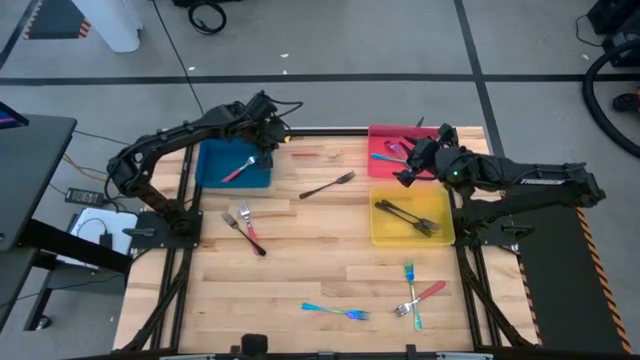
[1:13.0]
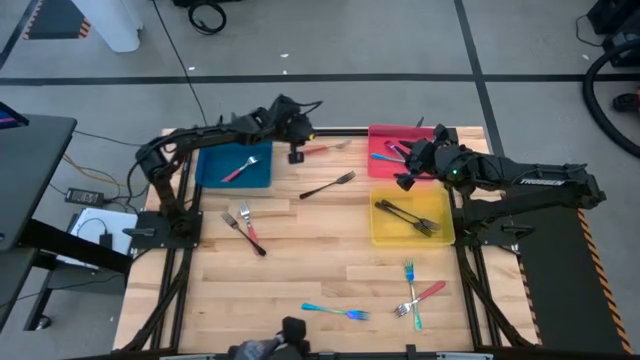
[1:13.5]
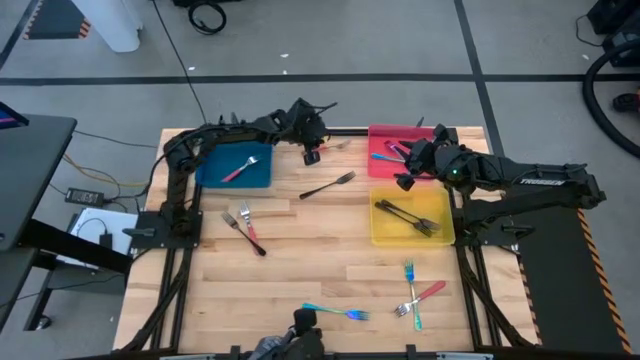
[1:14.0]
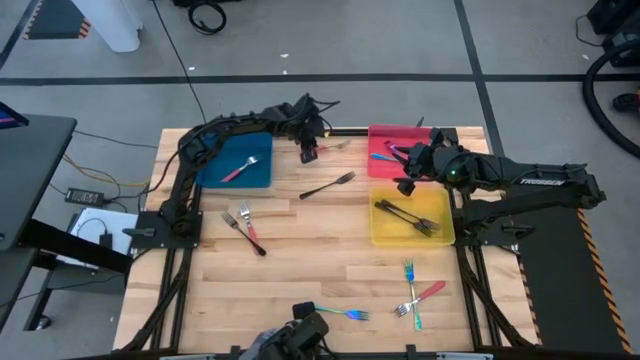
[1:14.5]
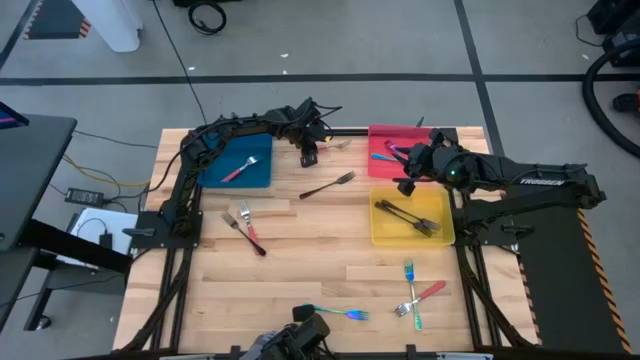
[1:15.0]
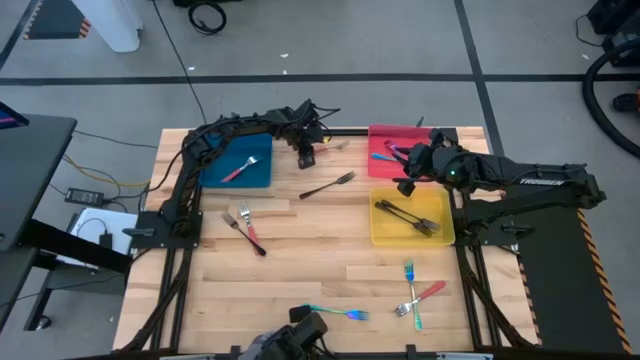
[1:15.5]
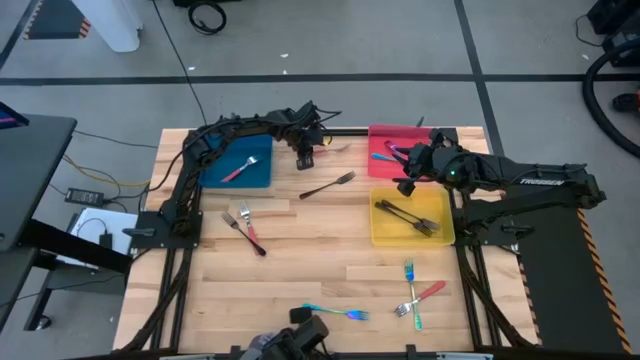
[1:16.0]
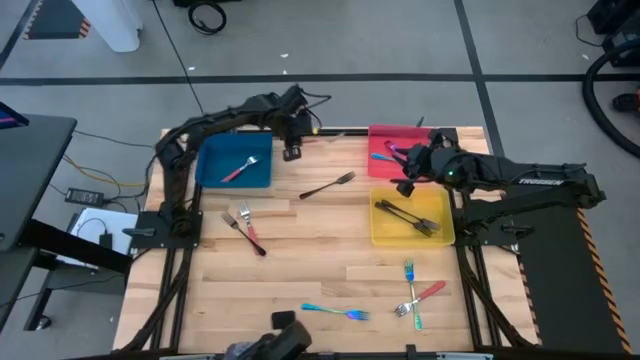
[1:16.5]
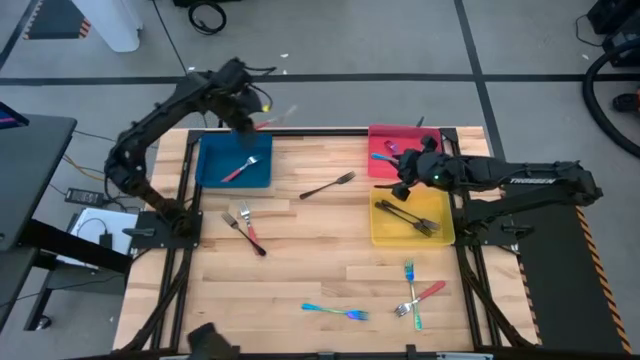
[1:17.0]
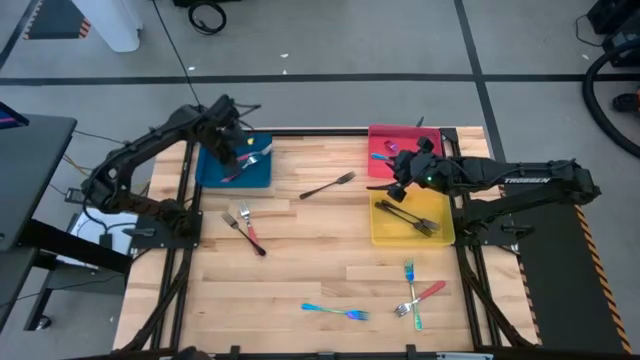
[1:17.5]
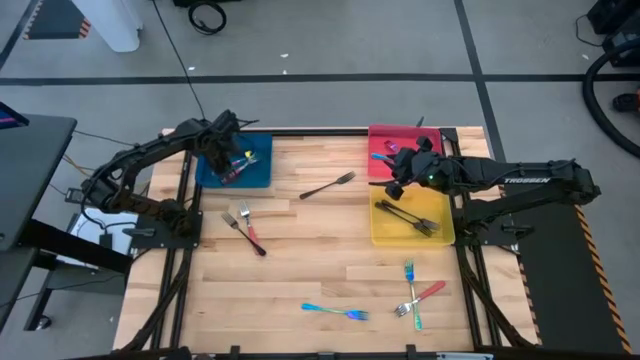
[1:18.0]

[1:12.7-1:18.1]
Task: Sort silverware by color (type)
Put the red fork into the blue bin

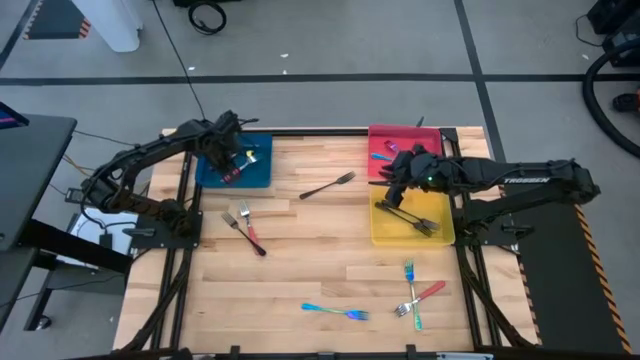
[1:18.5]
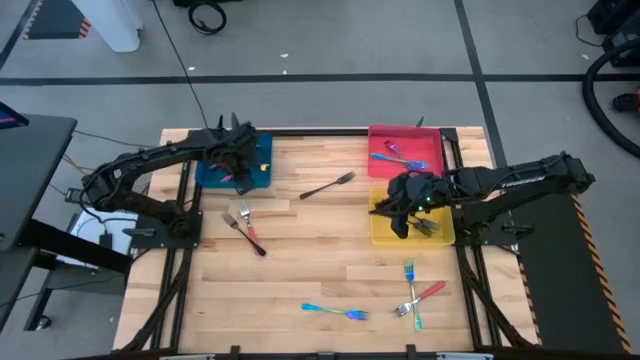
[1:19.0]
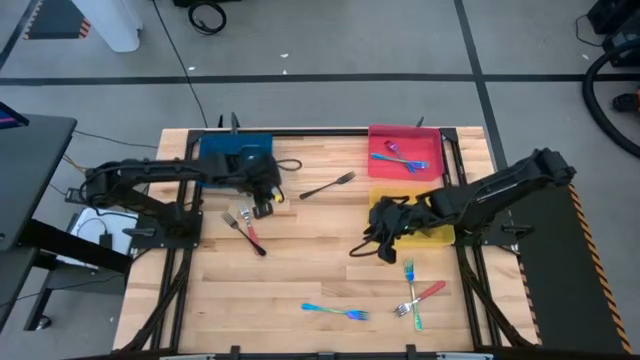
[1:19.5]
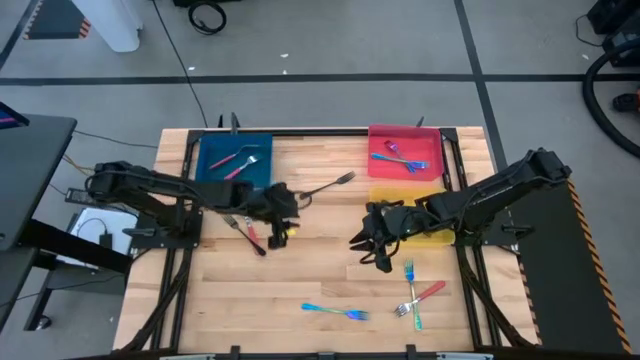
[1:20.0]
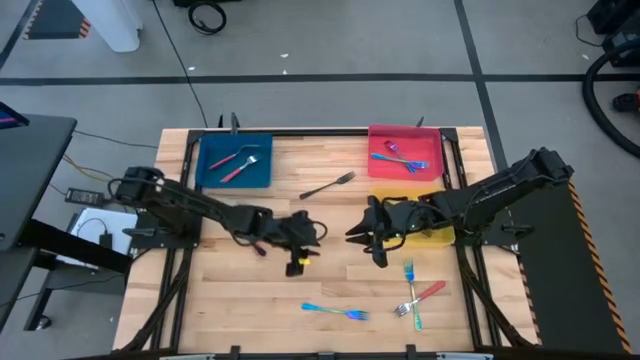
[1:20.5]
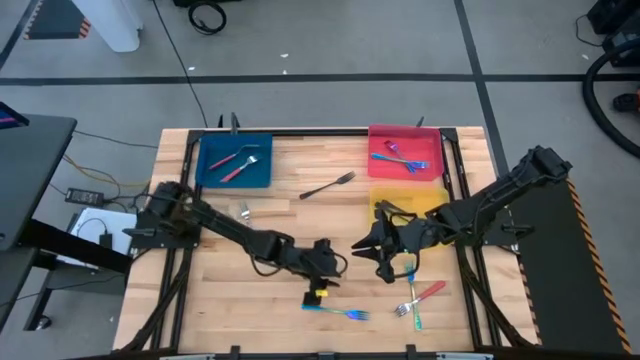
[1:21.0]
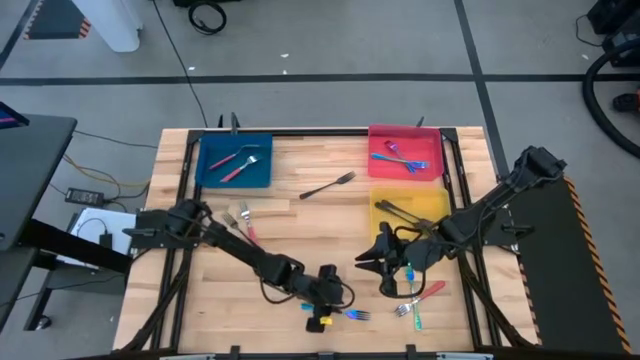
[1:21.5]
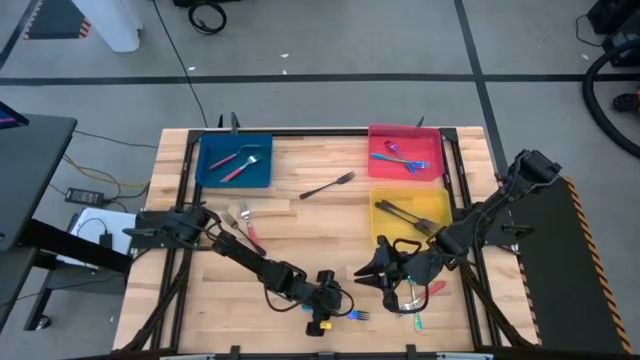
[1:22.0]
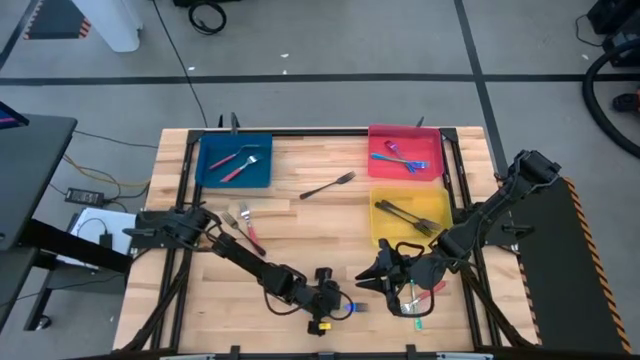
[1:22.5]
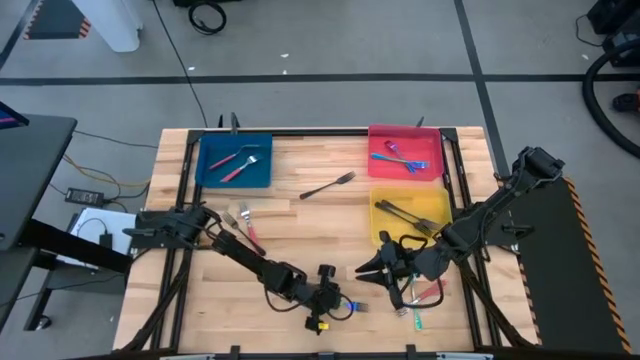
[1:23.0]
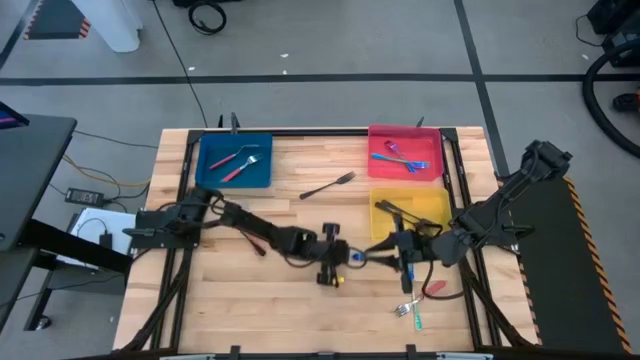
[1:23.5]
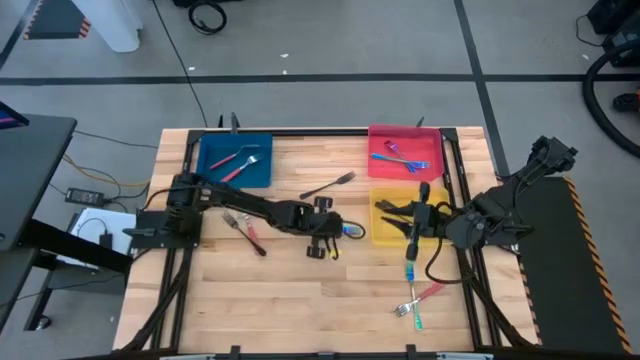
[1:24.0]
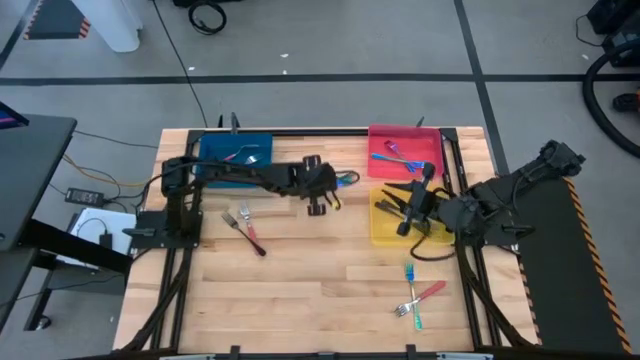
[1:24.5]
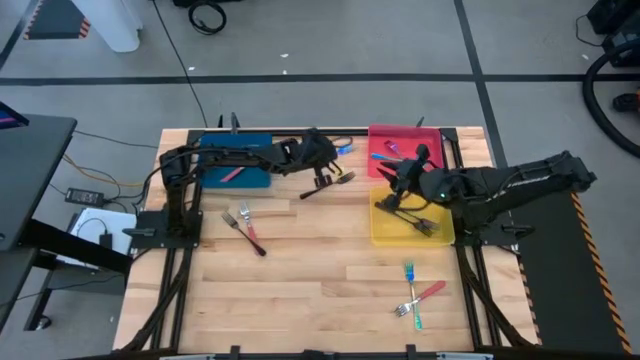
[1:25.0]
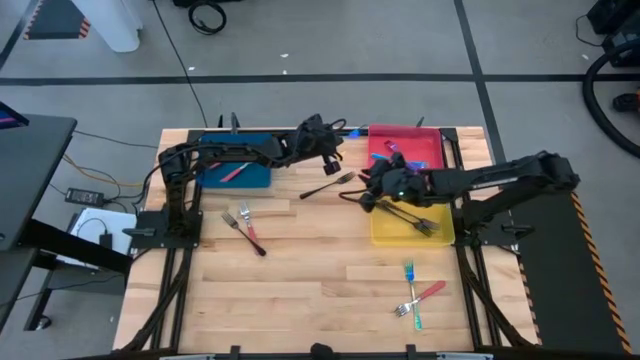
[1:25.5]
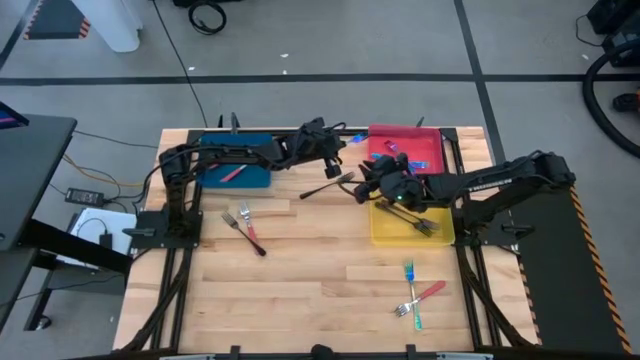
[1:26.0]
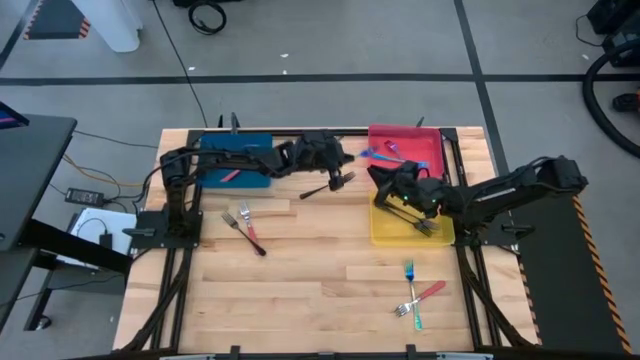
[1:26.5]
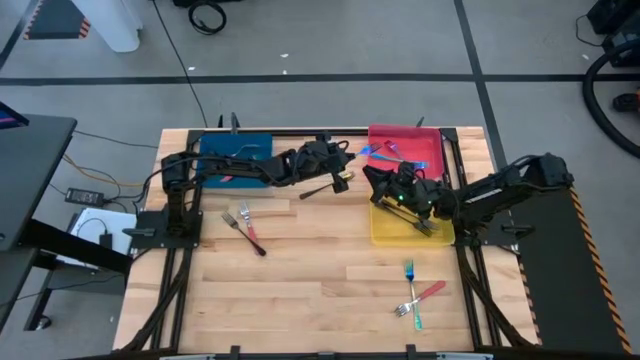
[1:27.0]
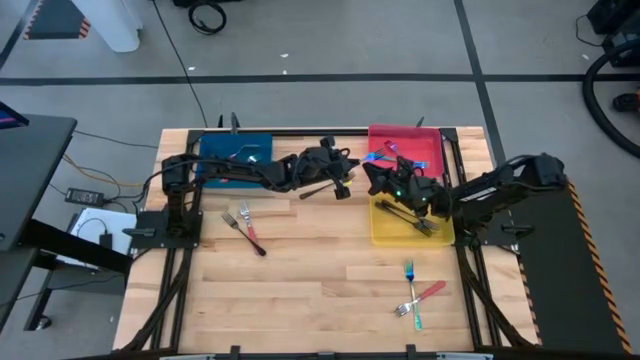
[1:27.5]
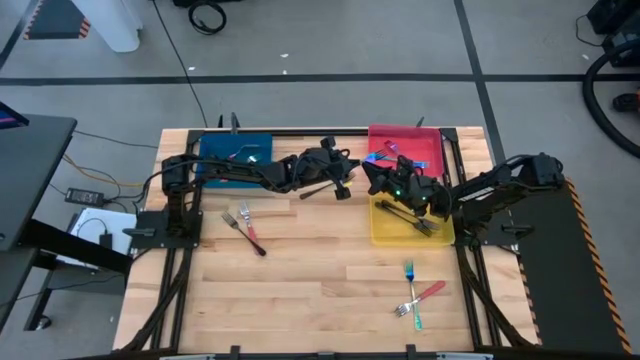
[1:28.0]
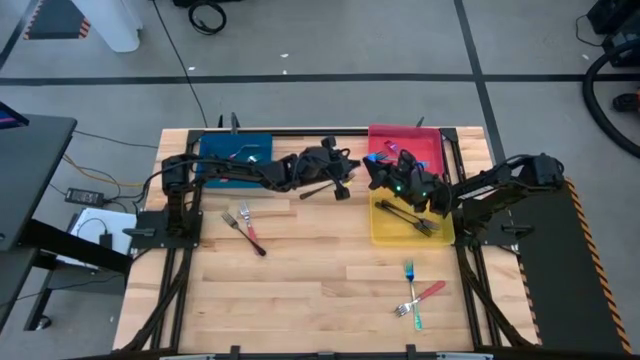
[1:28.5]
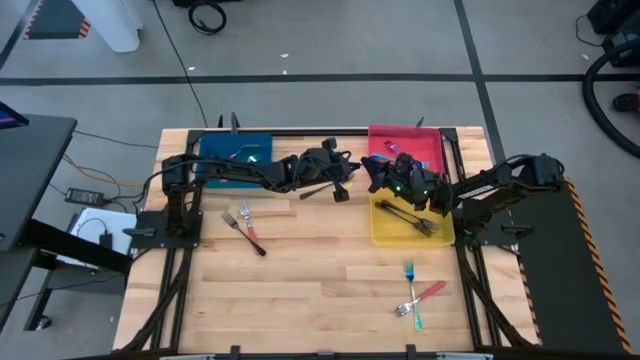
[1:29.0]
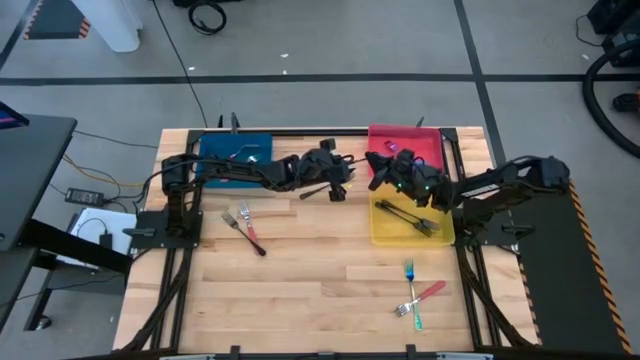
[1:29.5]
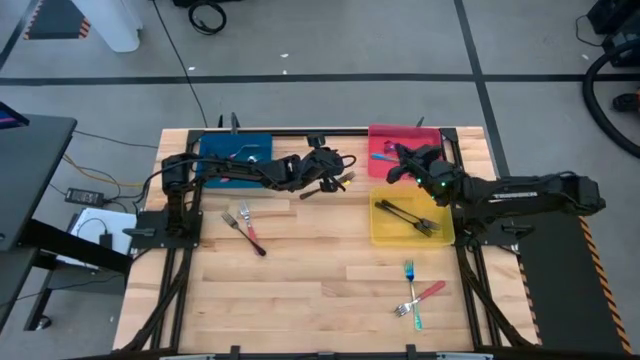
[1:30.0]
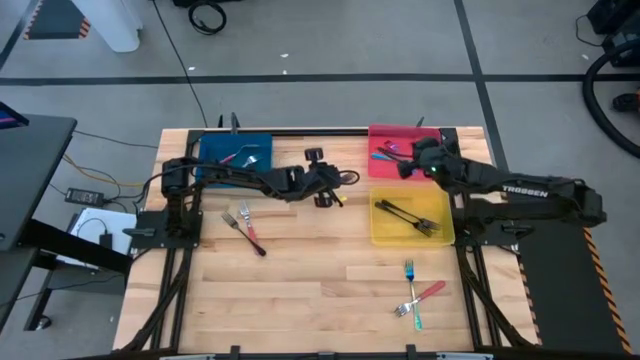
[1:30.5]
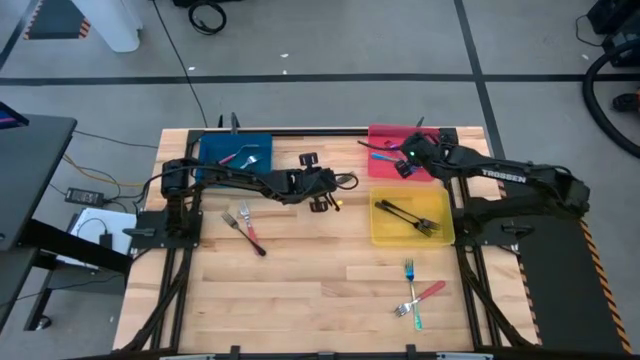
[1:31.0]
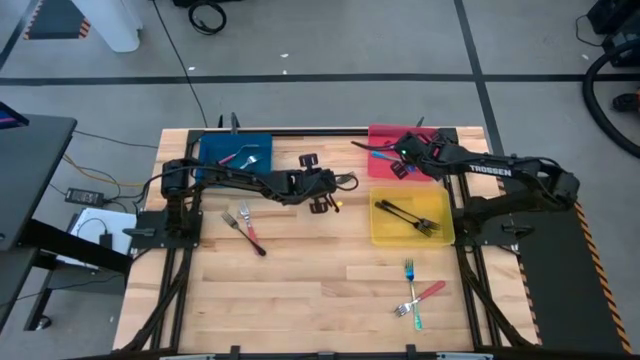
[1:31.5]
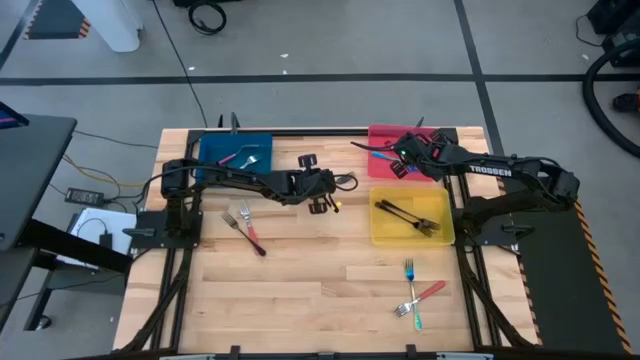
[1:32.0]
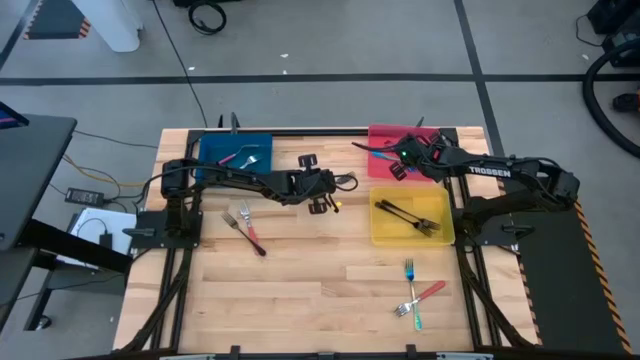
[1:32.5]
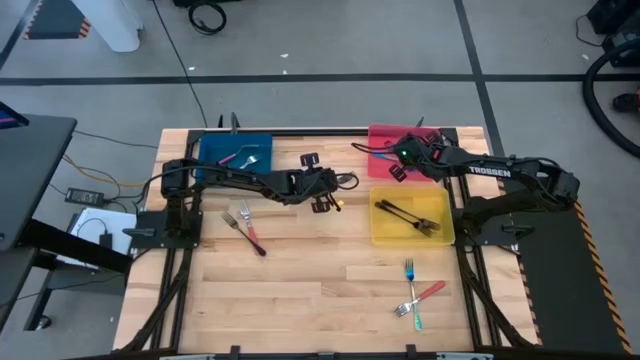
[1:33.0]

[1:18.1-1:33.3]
Put the blue fork into the red bin

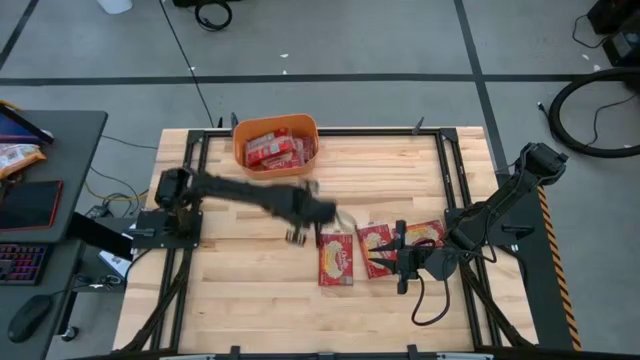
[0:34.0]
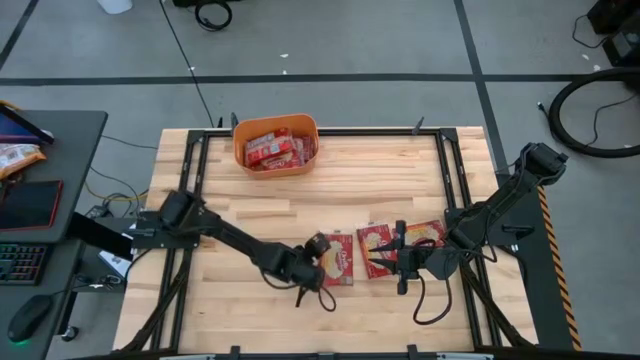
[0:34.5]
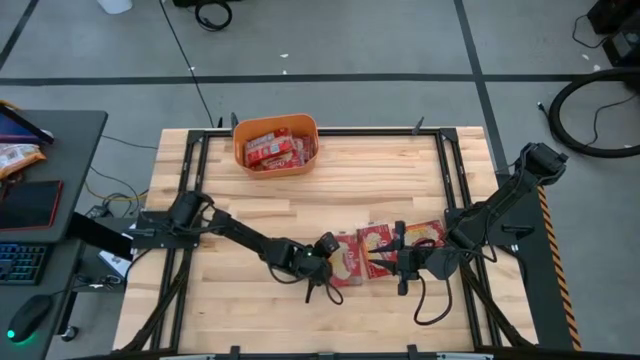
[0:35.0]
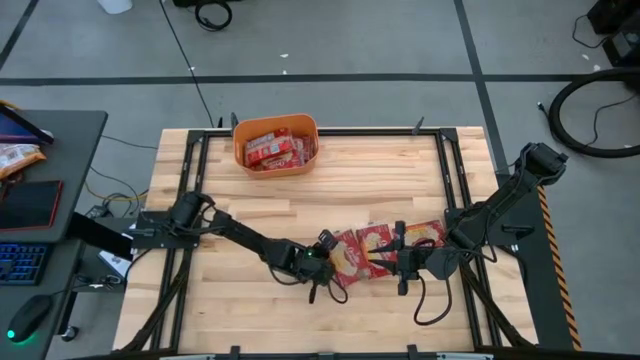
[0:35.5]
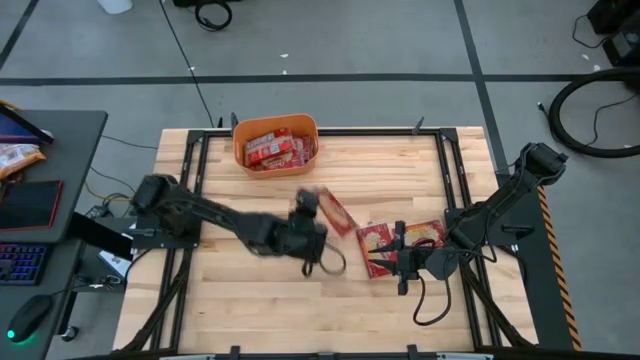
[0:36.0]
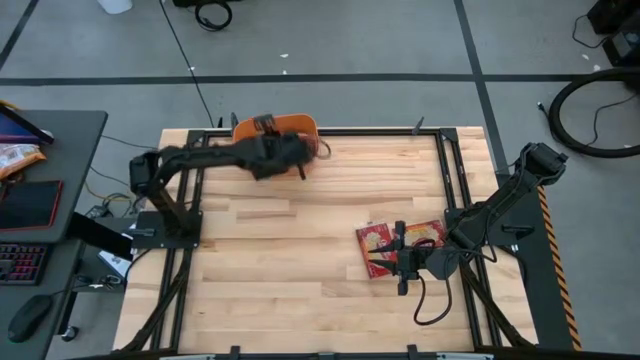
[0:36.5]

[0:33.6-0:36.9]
Task: Sort popcorn bags into baskets
Put the red popcorn bag into the orange bin
